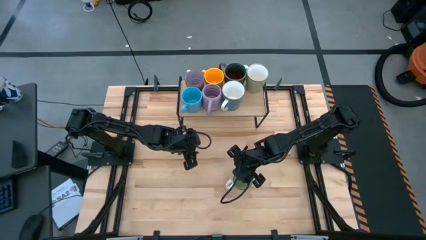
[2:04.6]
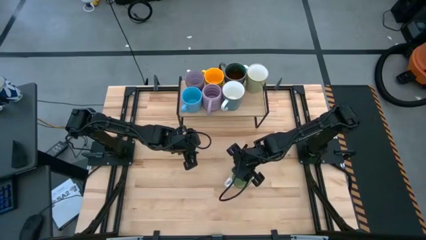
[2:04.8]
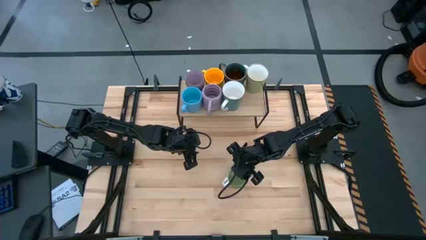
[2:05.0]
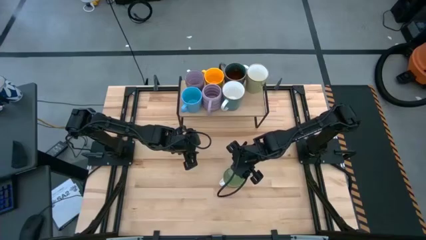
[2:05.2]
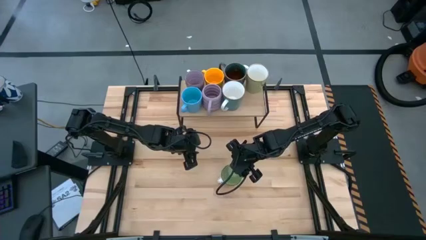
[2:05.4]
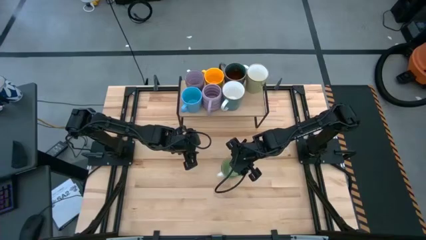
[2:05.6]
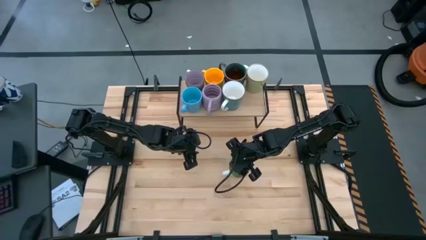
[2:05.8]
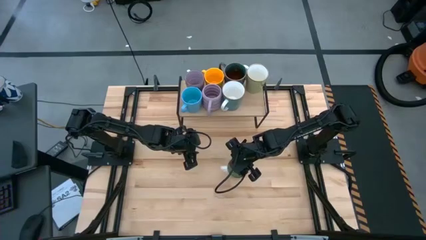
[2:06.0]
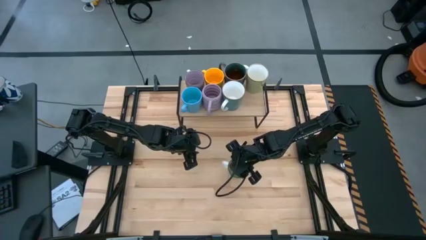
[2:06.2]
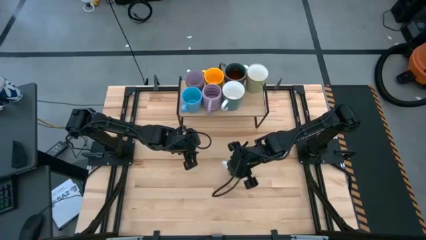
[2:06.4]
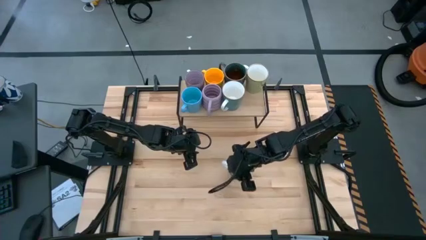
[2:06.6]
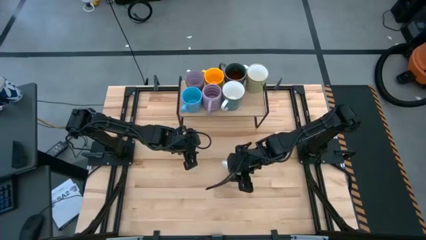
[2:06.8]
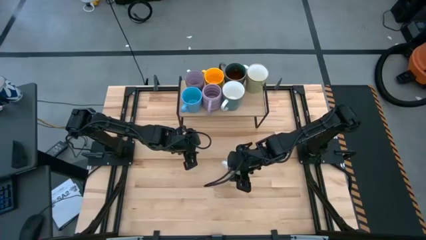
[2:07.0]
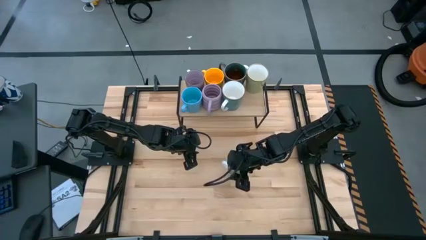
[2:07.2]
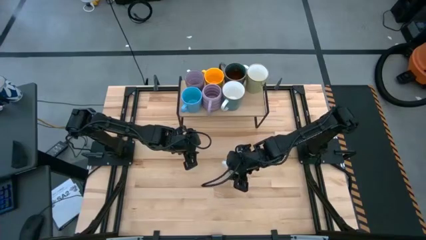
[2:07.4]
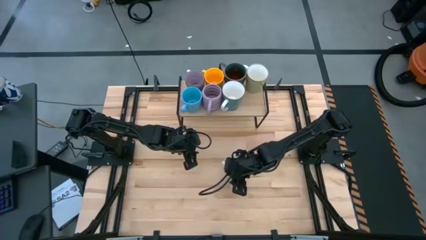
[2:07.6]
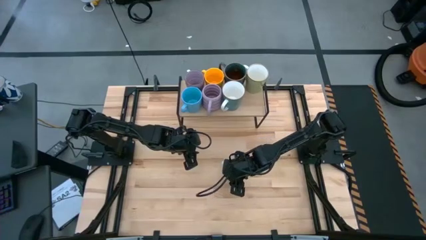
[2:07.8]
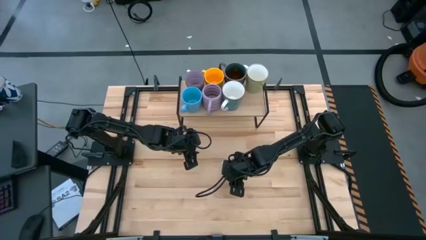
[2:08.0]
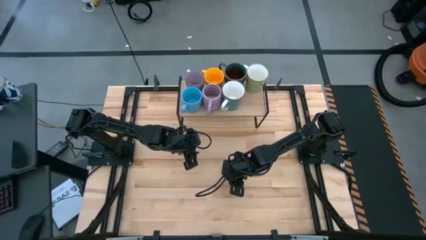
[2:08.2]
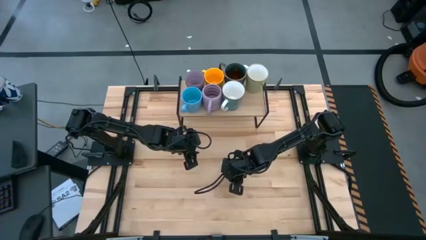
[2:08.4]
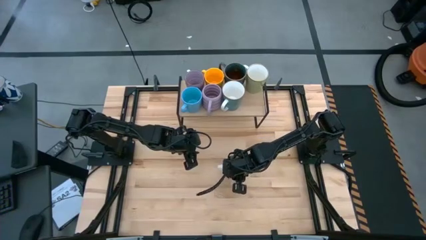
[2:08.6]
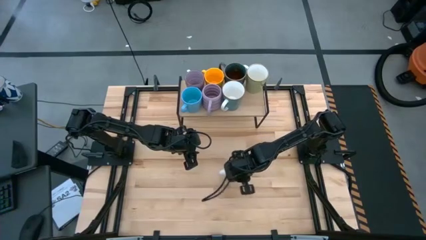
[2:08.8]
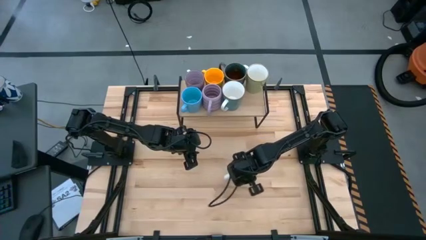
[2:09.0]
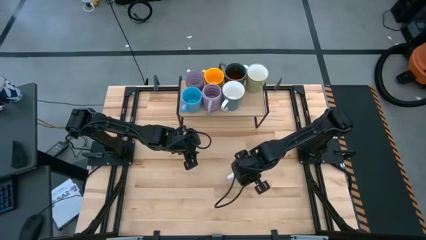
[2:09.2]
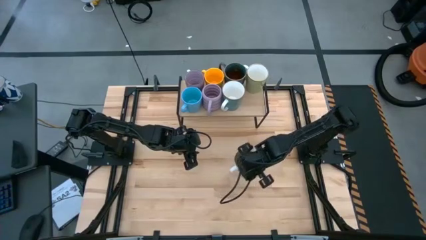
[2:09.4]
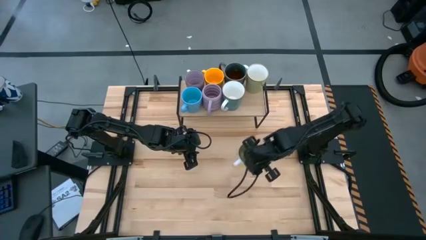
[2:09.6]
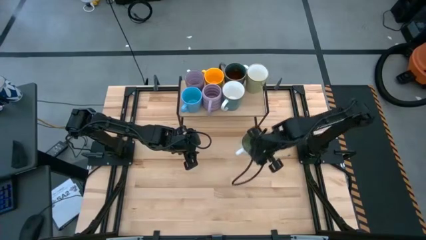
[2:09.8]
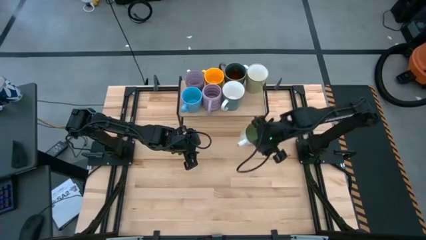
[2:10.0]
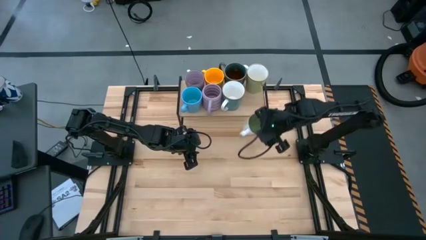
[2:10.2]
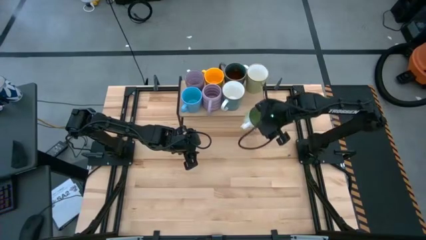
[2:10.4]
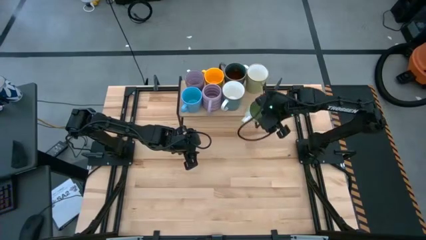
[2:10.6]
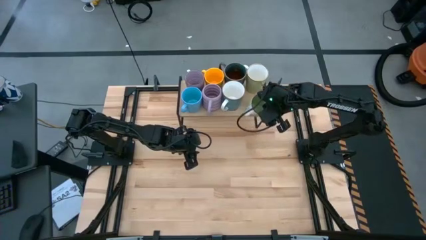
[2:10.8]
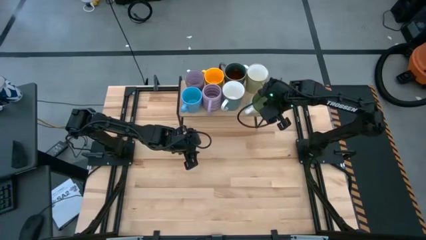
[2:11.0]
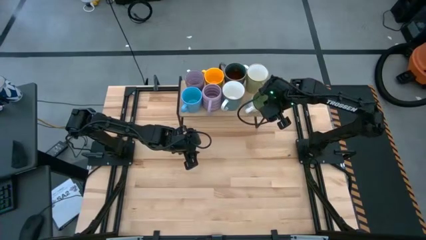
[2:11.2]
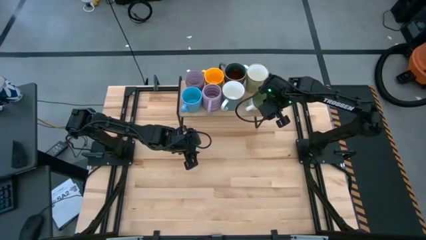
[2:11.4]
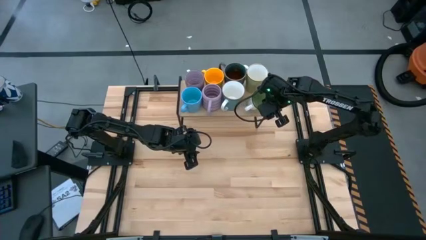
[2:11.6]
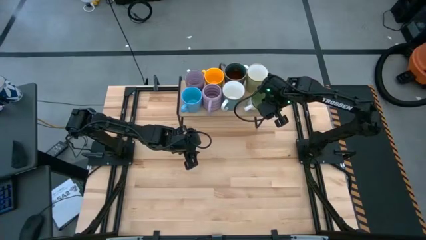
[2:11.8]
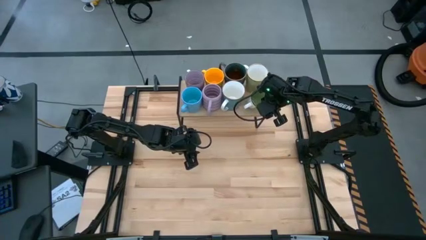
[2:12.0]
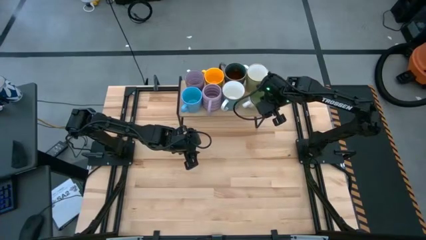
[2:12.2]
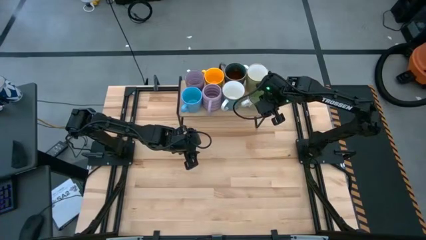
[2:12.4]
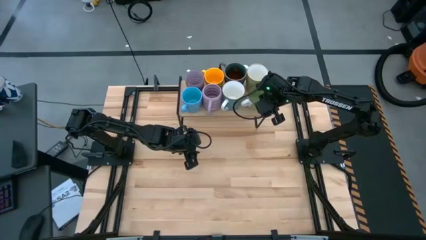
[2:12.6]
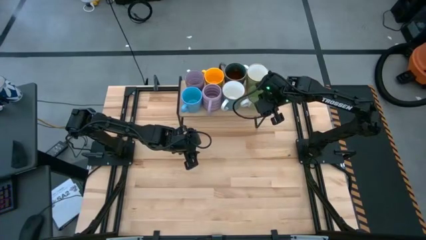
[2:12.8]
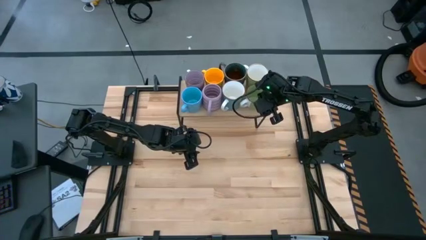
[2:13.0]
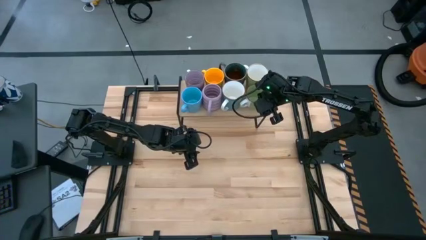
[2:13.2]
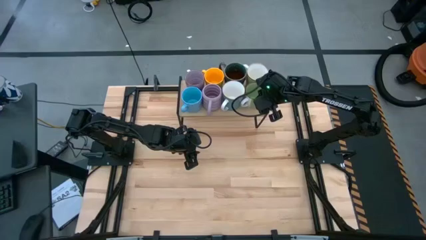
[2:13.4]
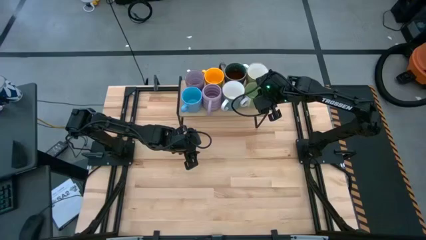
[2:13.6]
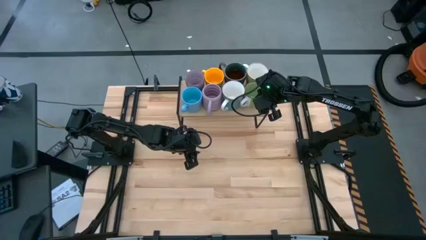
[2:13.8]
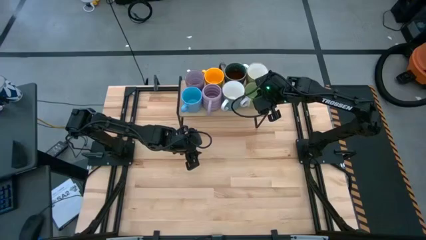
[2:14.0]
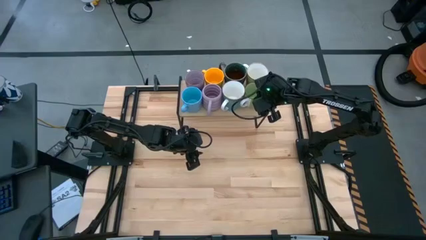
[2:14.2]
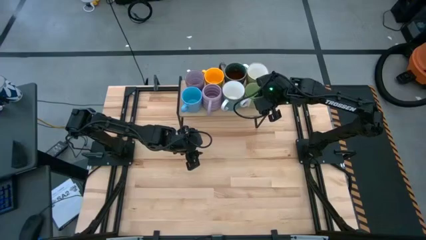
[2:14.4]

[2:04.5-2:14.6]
Task: Place coffee mugs
Put the light green mug on the shelf

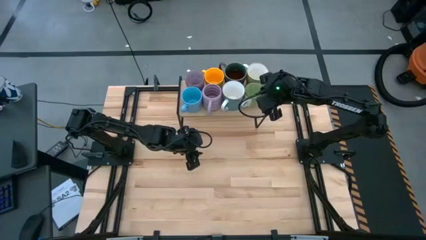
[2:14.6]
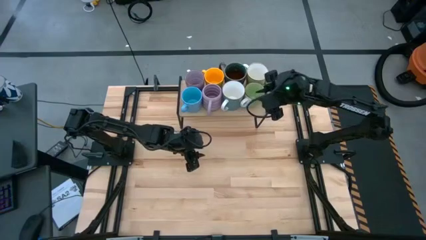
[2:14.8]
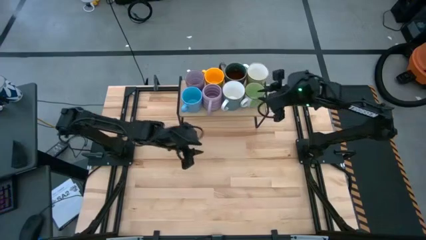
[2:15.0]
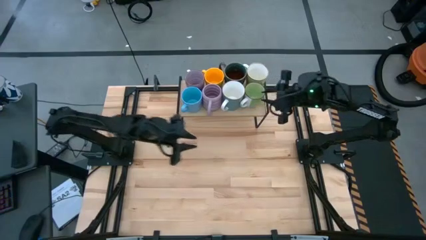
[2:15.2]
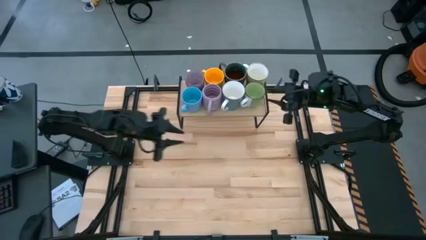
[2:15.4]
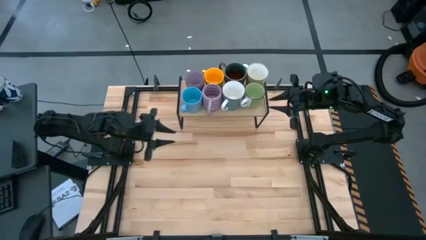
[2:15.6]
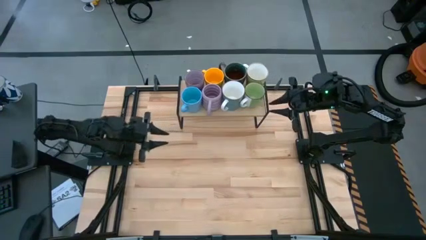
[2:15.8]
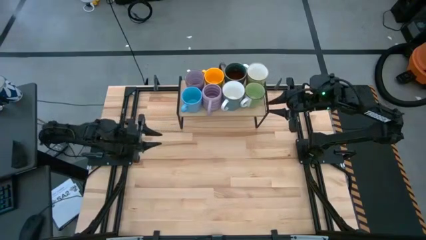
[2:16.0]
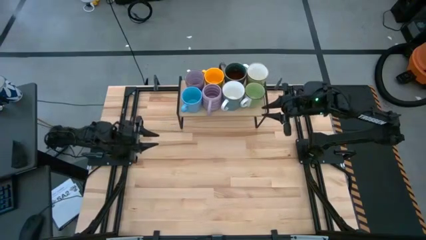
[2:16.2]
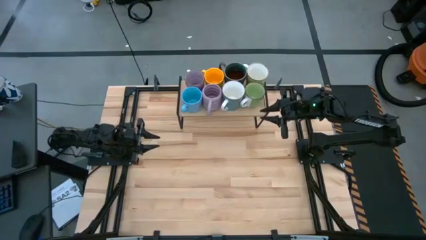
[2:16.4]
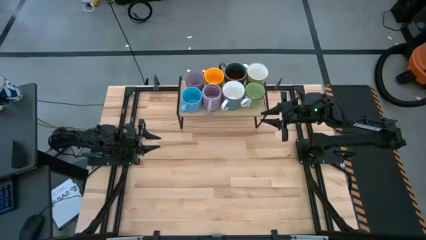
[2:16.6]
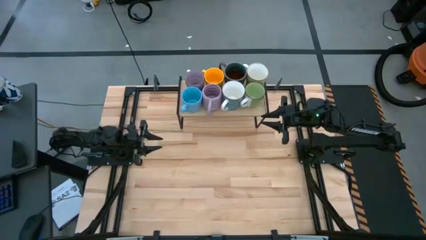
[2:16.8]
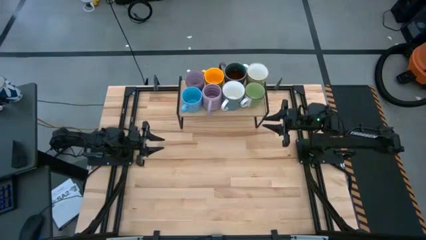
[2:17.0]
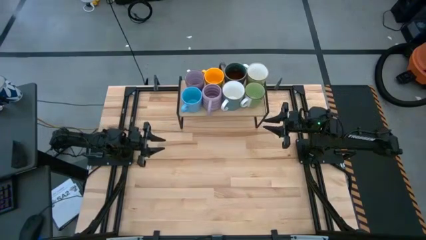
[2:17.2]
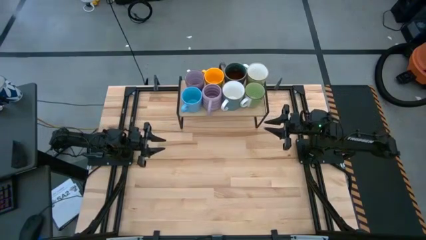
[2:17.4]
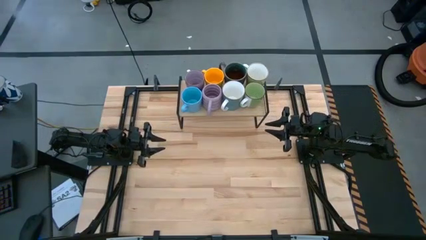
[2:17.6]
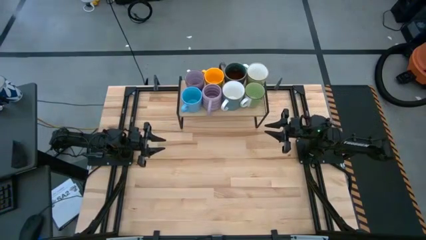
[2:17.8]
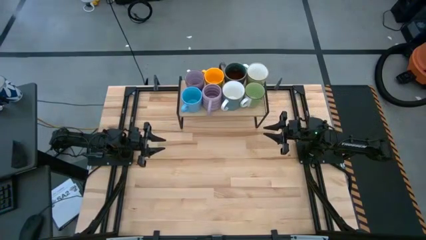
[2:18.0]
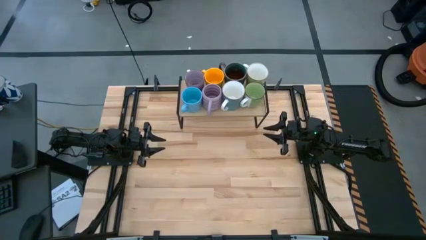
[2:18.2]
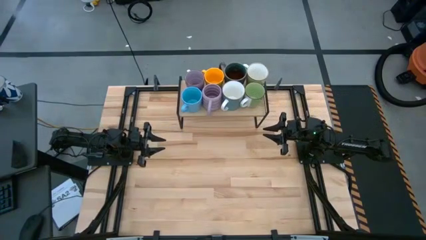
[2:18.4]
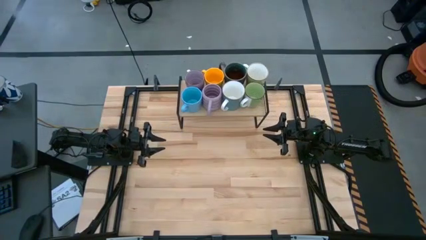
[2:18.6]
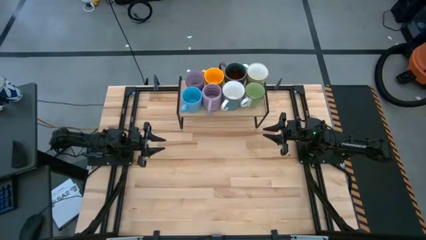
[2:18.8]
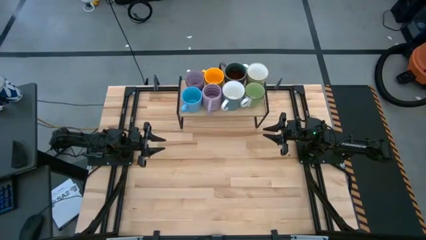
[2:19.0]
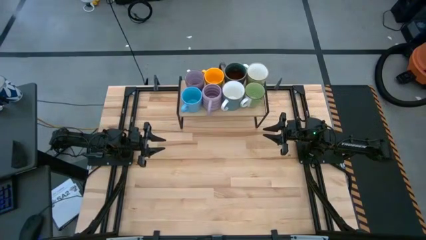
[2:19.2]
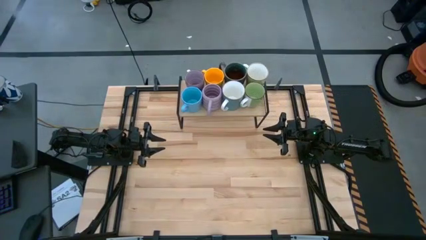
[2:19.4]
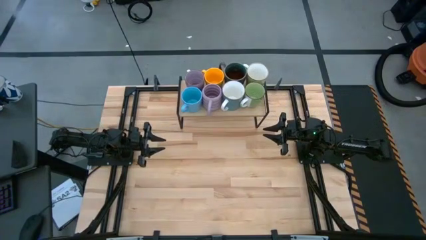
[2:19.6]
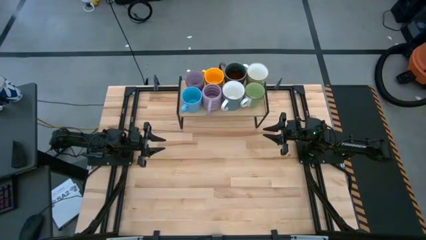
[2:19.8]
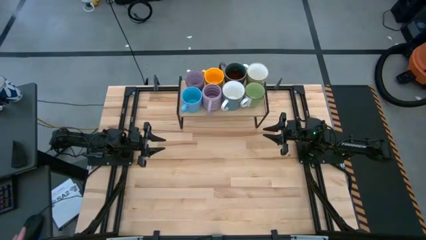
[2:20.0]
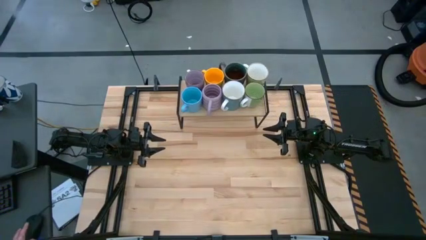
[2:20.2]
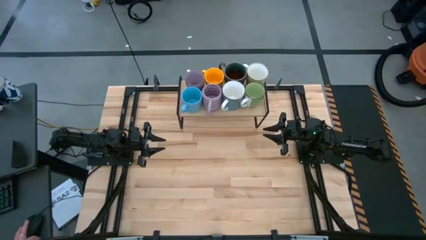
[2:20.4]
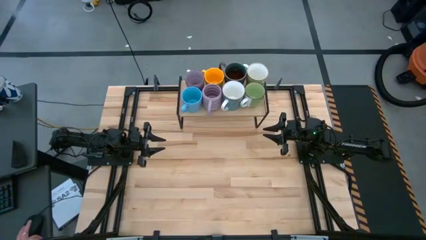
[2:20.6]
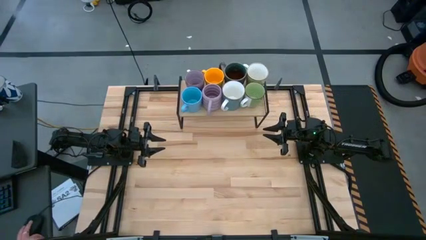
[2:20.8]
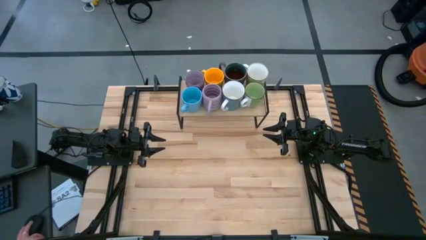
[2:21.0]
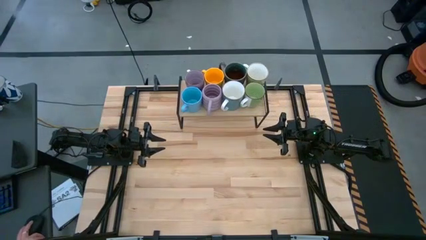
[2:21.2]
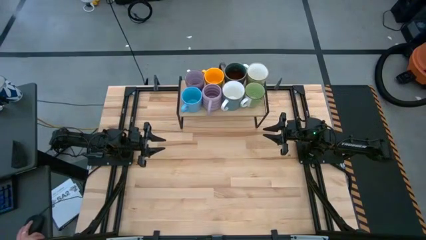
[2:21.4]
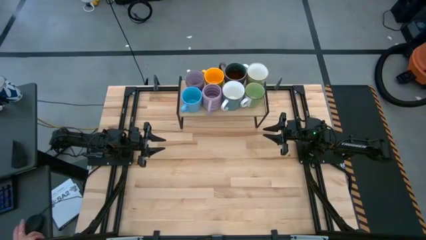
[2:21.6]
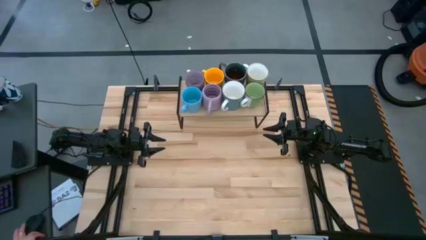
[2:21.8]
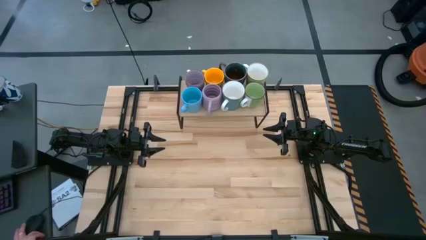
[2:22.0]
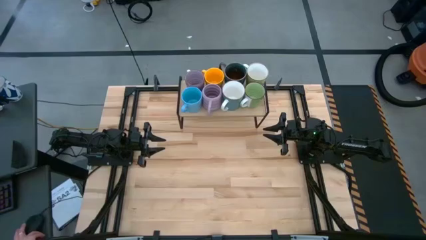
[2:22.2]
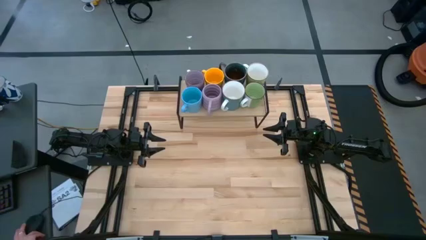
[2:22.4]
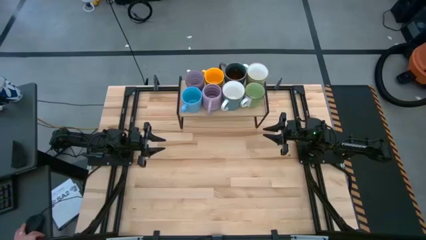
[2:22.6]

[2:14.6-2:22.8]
Return to Home Position
